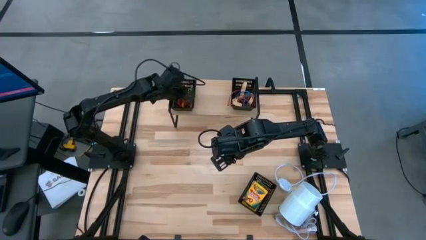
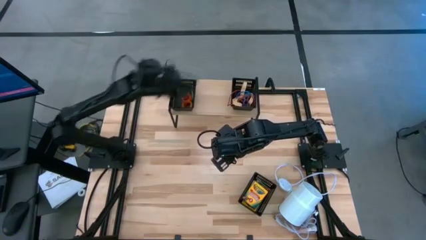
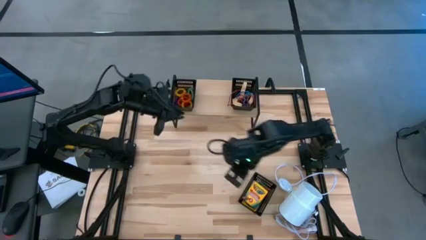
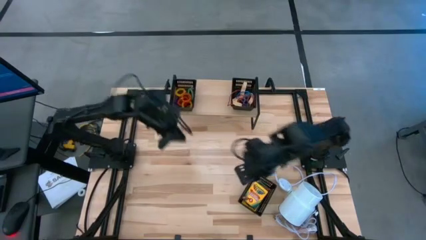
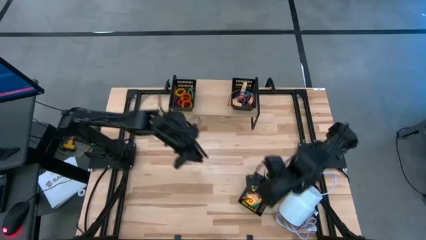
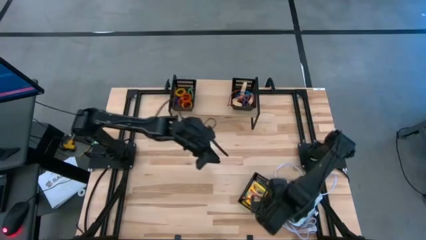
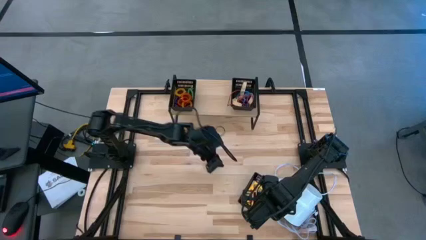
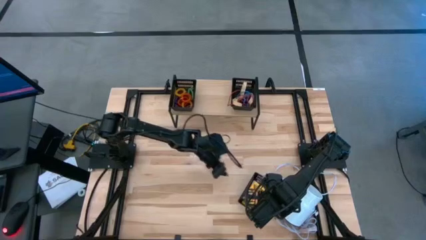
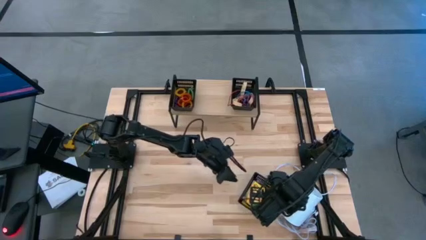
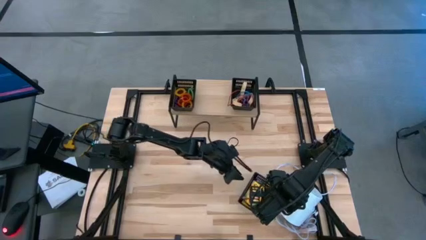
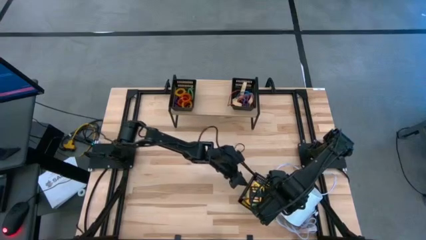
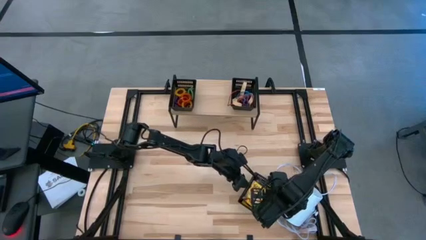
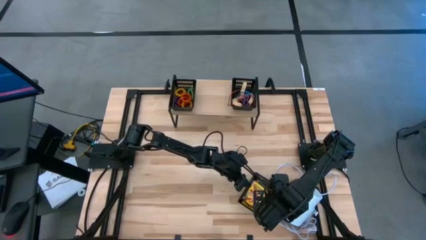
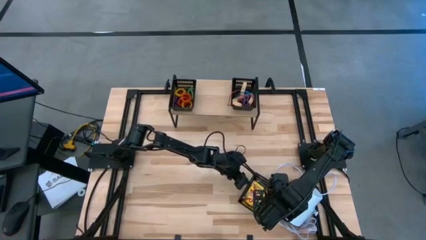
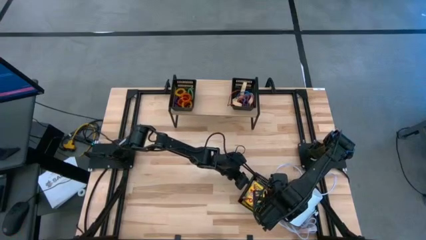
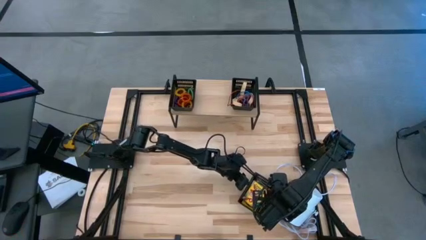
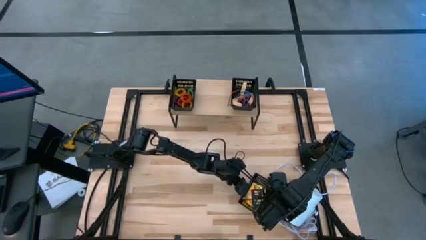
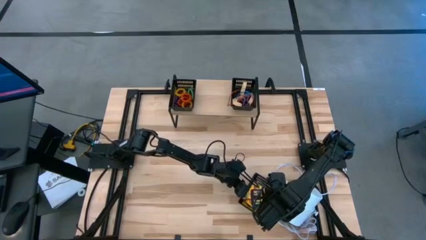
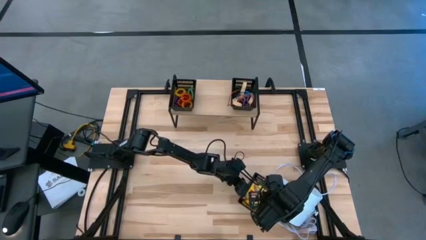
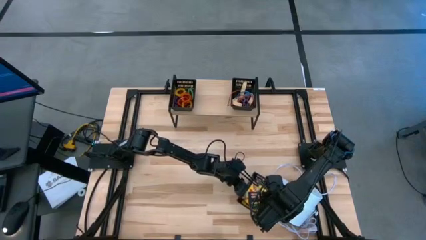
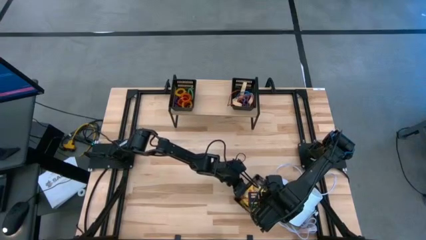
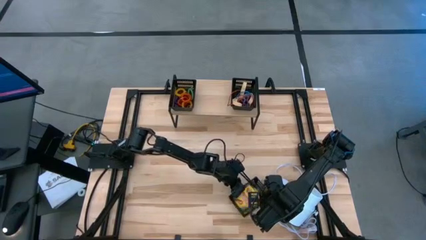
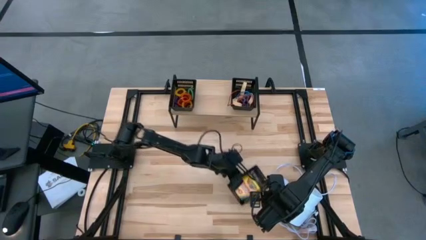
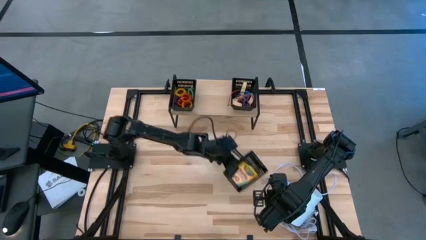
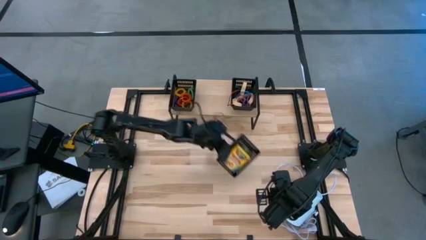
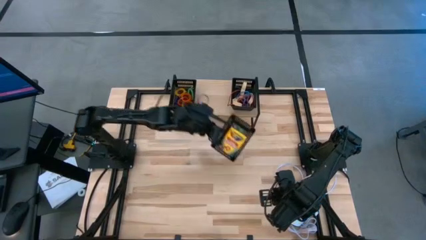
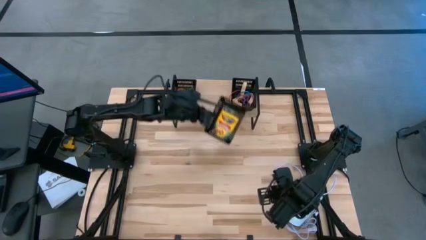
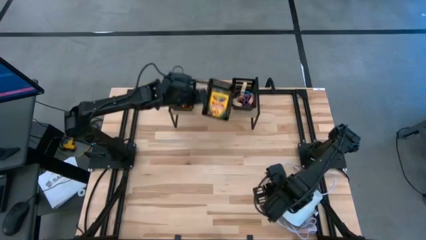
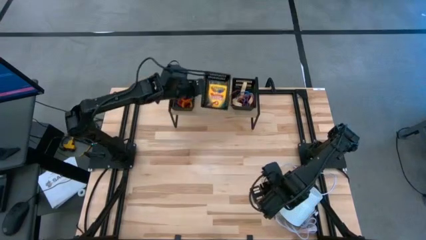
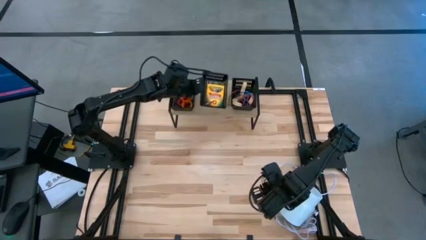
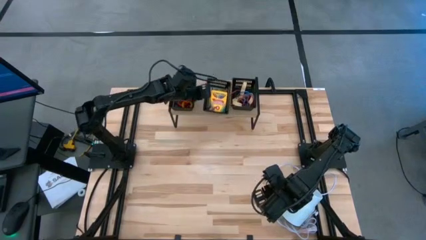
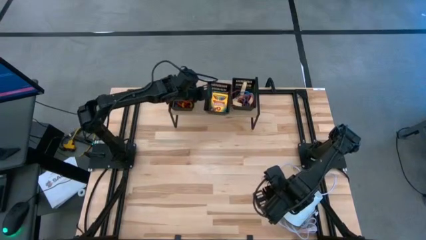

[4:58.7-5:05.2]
Task: Pick & Place Office Desk Supplies
Put the black bin on the shelf

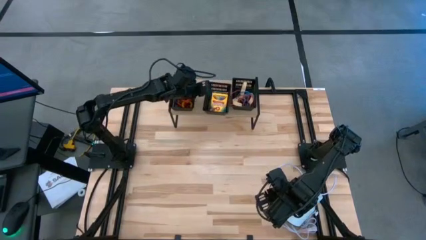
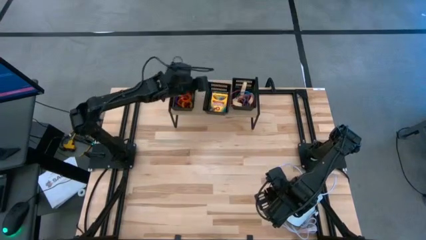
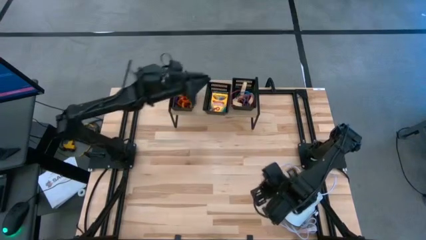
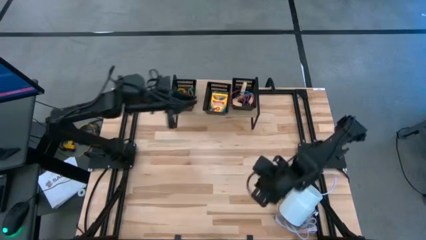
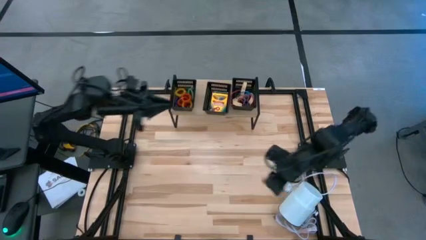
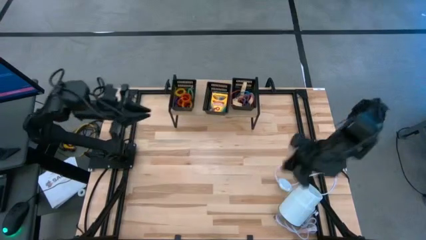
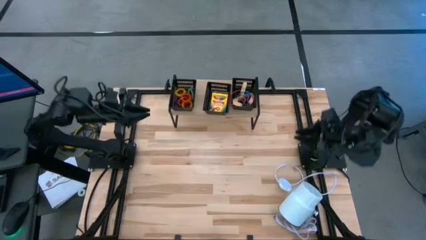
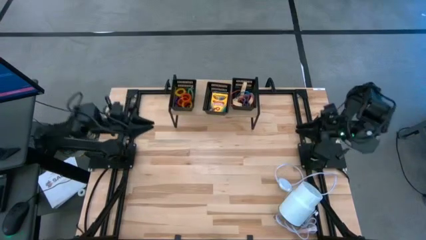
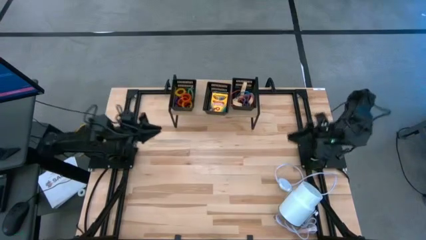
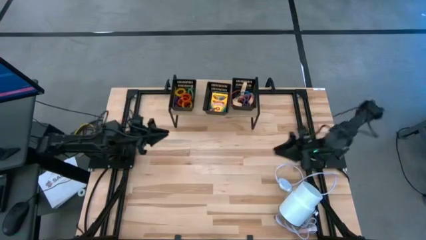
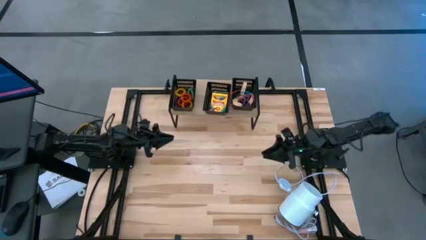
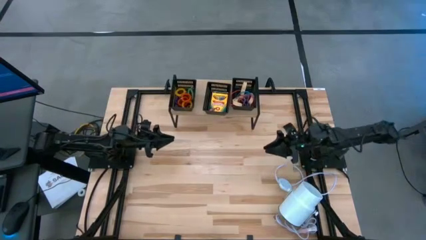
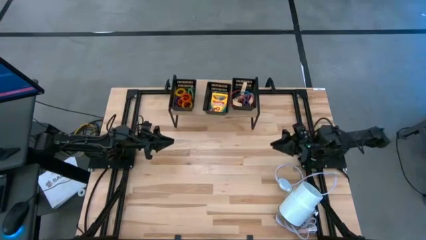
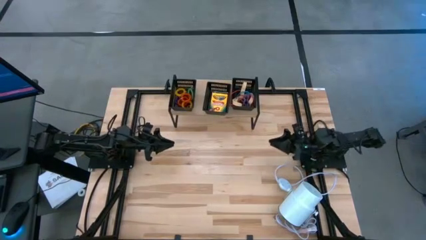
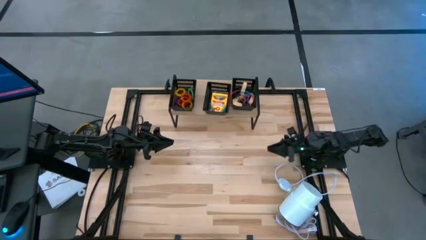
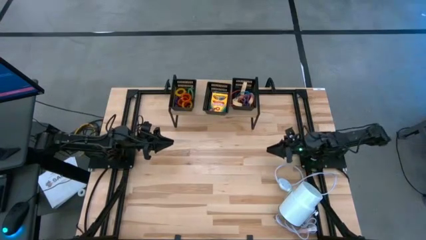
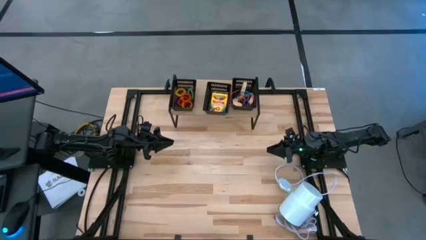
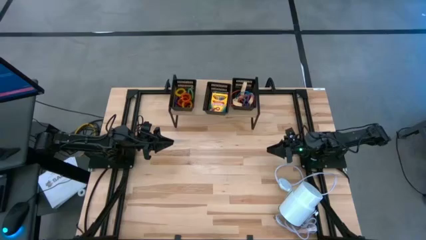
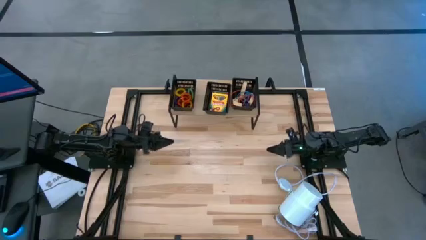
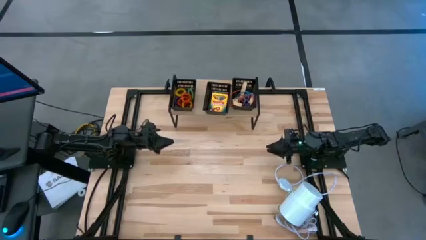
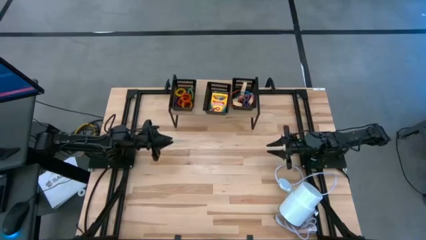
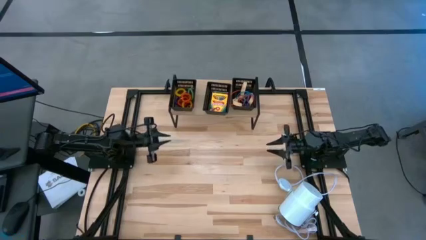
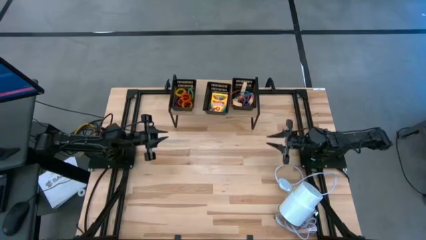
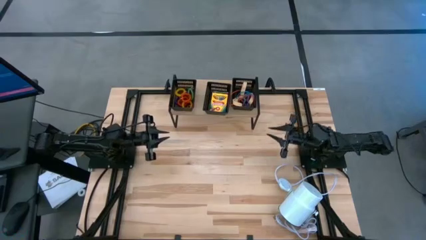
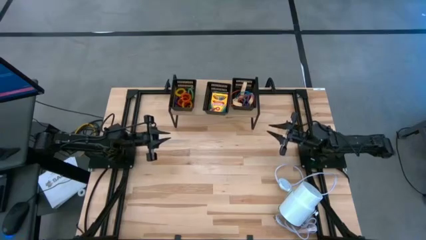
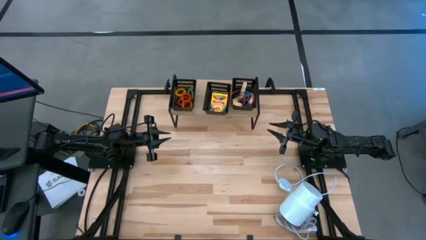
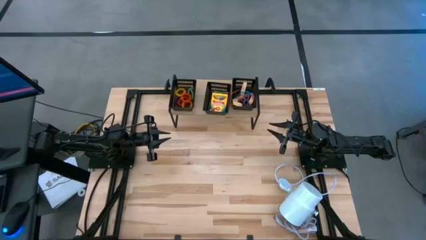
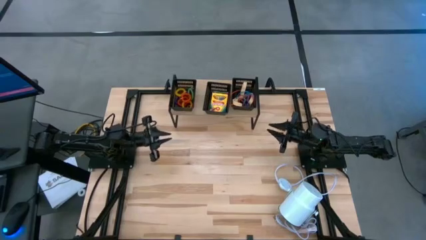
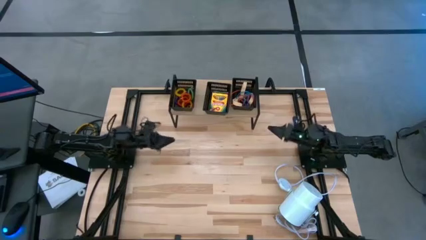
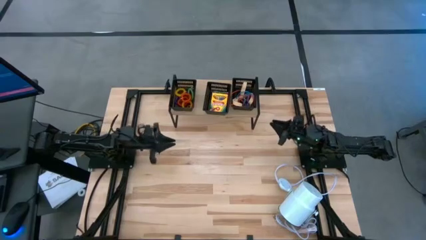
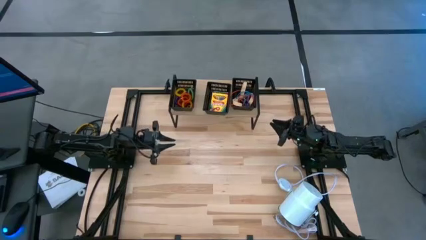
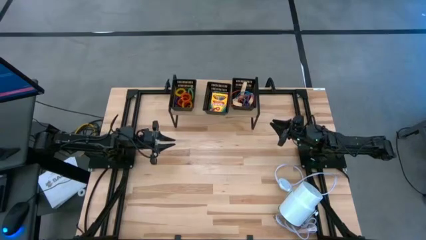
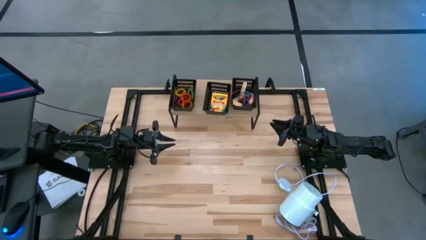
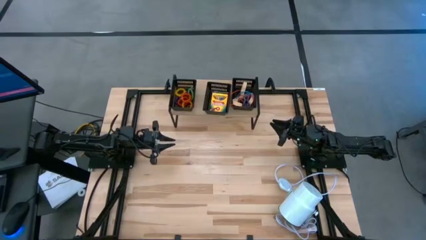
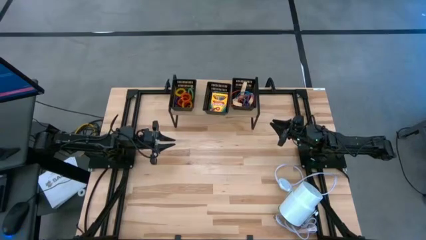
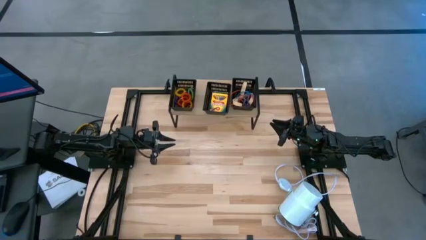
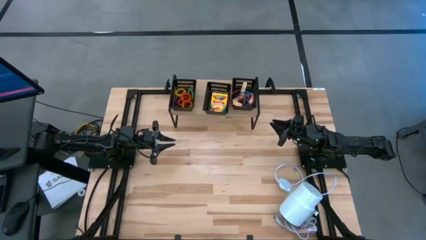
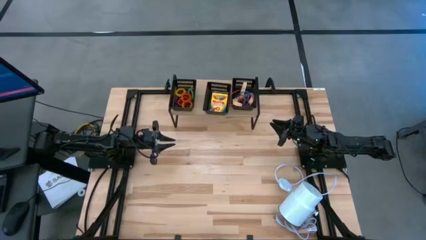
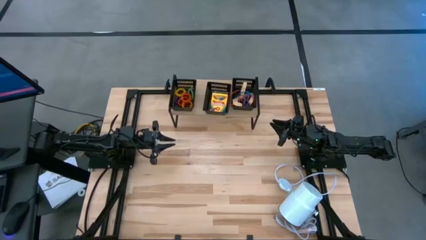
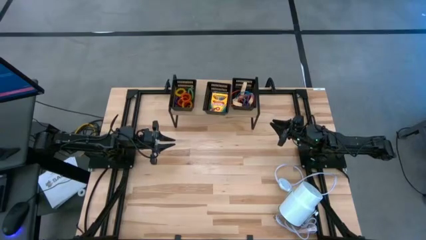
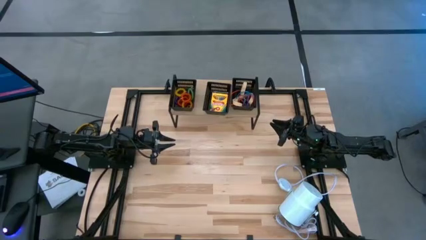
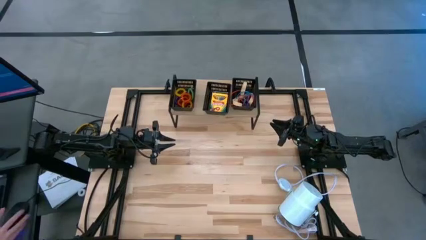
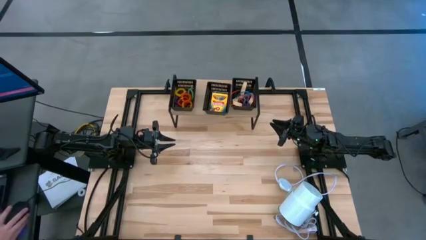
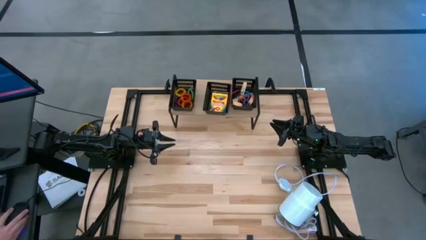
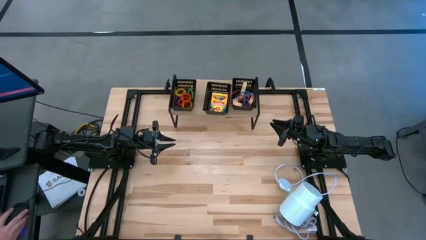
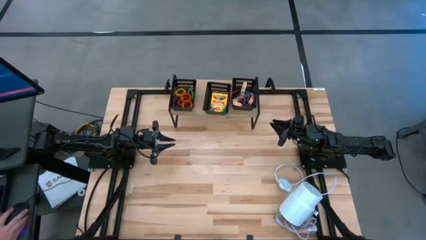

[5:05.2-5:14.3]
Return to Home Position

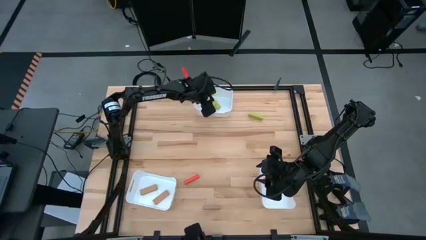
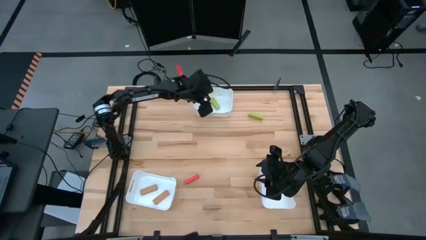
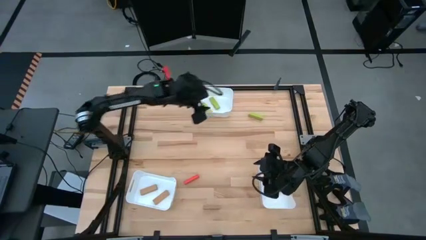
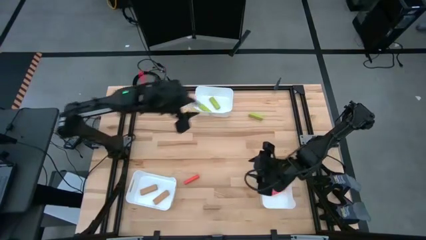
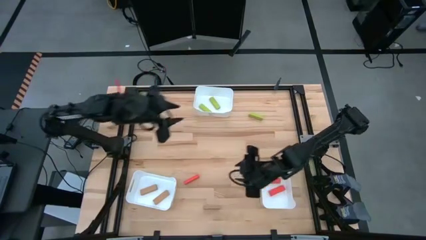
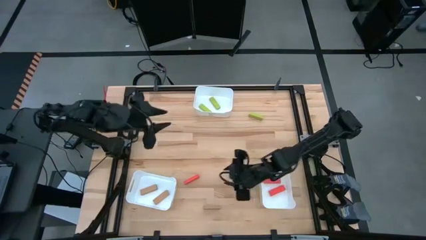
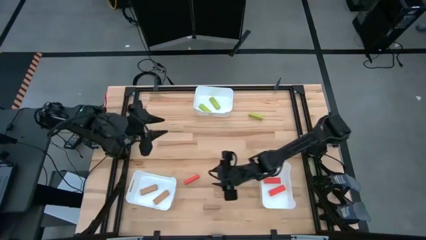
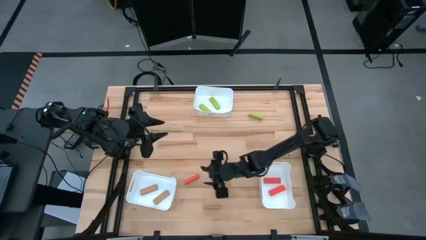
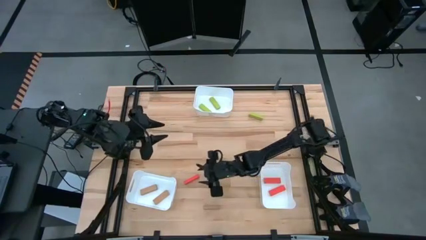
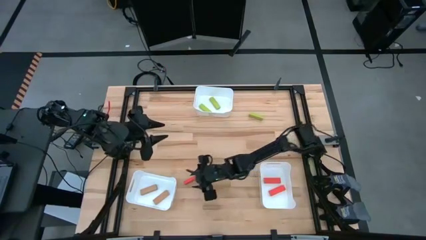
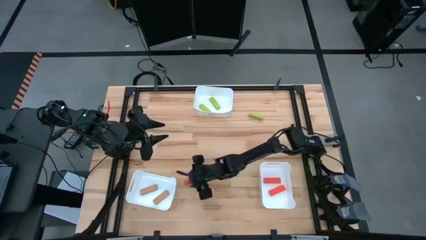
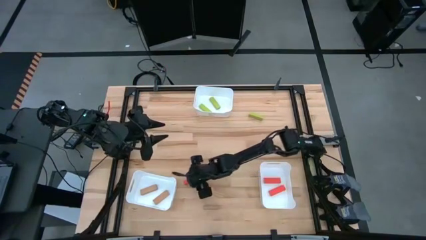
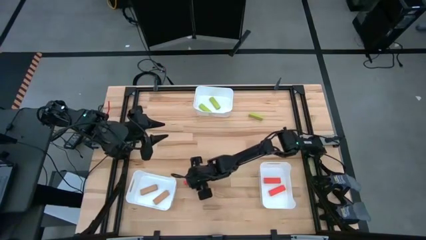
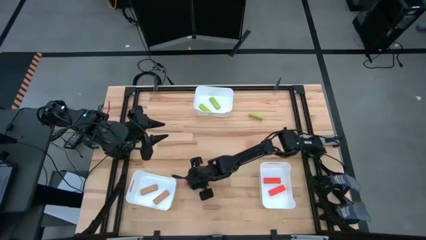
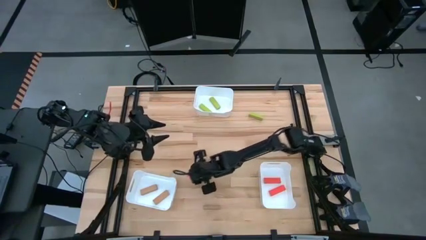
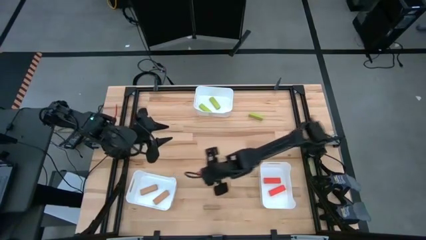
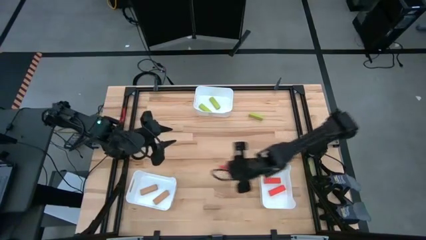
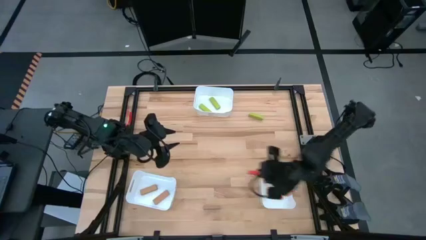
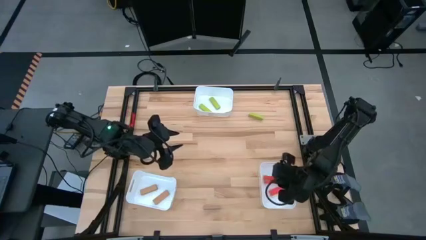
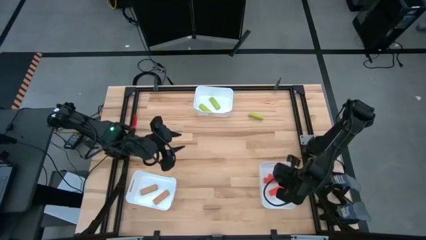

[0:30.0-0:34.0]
Task: Sort blocks
Put the orange block into the bottom left white bin
